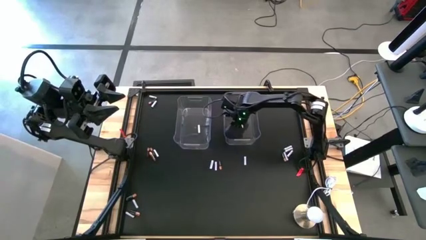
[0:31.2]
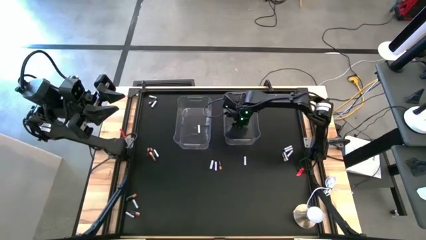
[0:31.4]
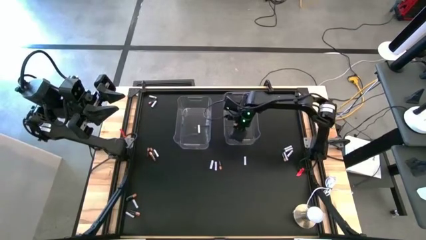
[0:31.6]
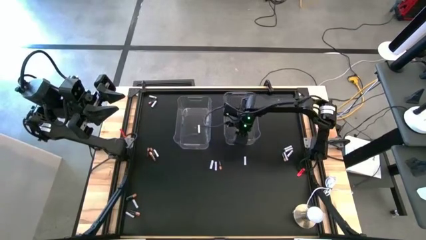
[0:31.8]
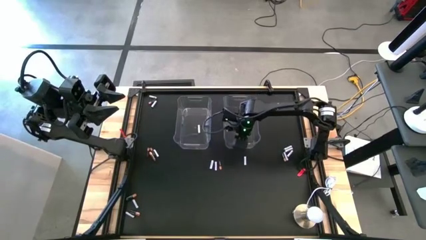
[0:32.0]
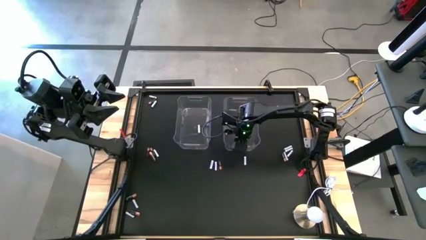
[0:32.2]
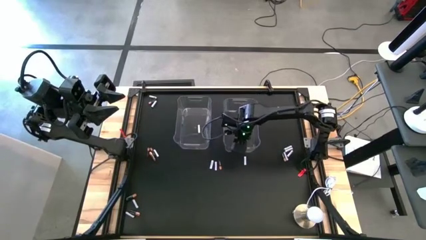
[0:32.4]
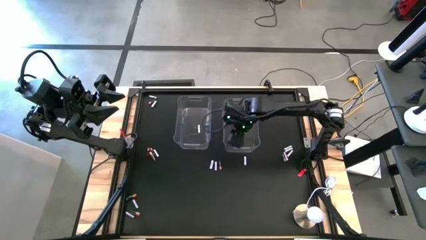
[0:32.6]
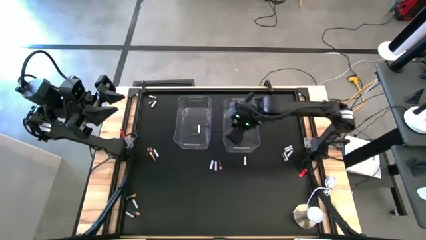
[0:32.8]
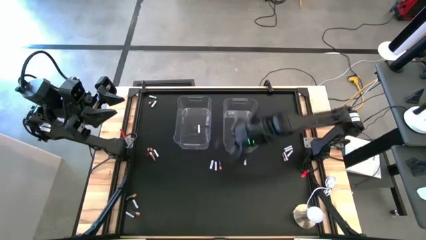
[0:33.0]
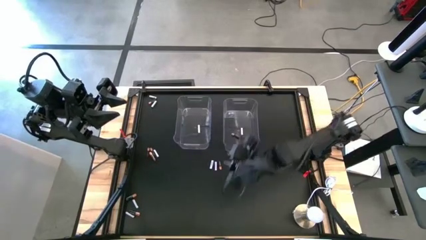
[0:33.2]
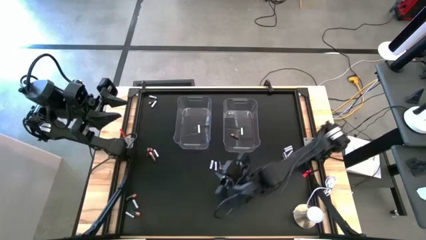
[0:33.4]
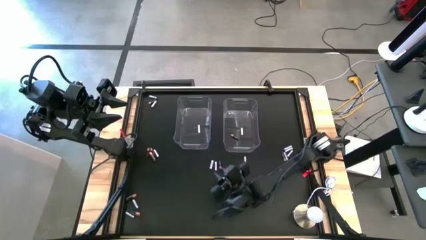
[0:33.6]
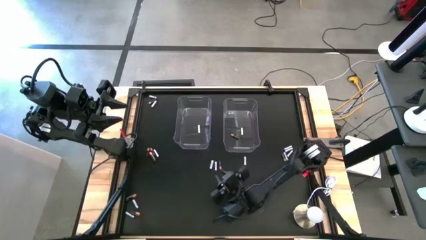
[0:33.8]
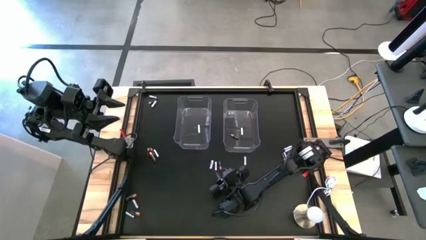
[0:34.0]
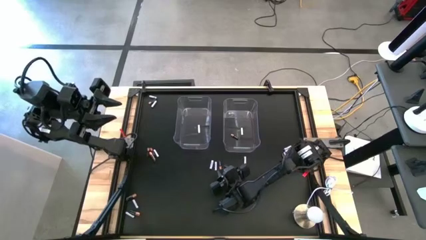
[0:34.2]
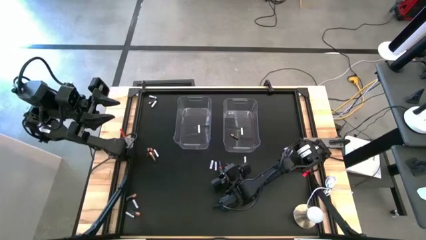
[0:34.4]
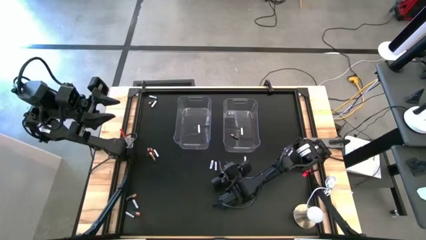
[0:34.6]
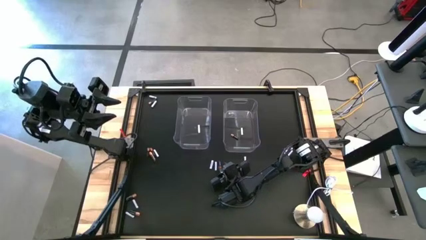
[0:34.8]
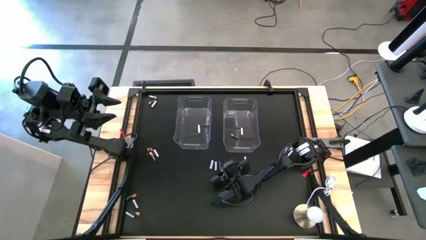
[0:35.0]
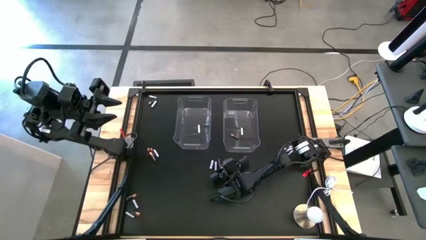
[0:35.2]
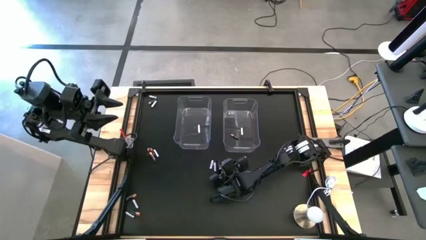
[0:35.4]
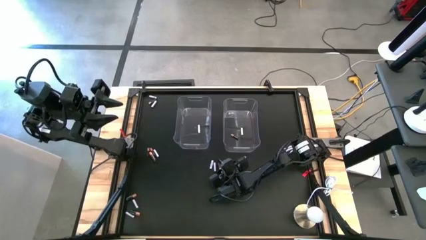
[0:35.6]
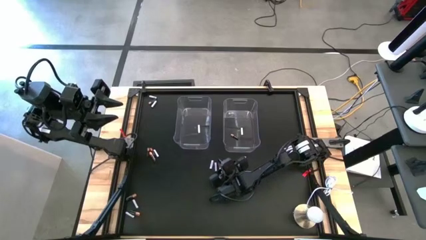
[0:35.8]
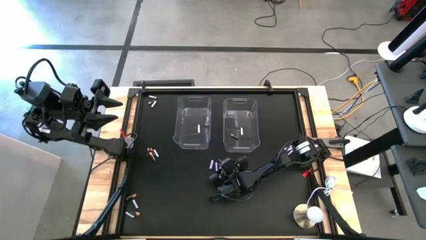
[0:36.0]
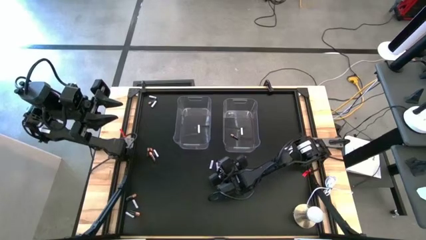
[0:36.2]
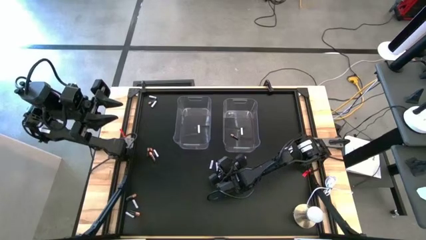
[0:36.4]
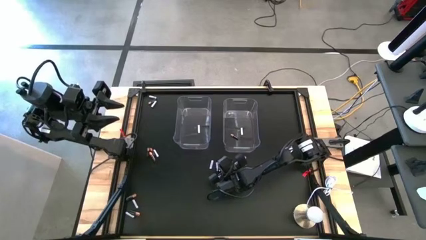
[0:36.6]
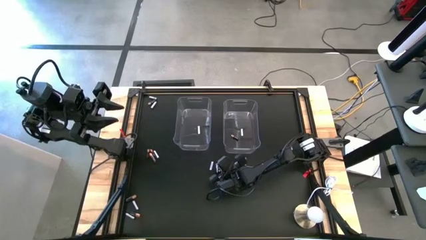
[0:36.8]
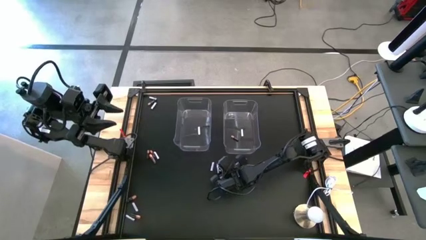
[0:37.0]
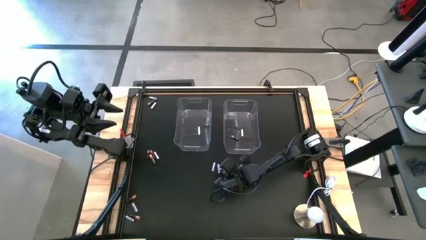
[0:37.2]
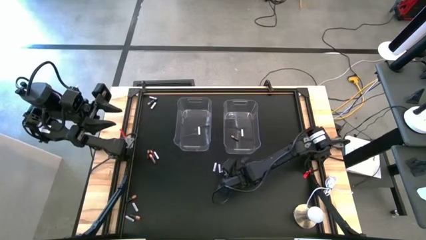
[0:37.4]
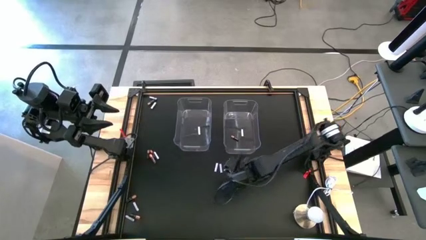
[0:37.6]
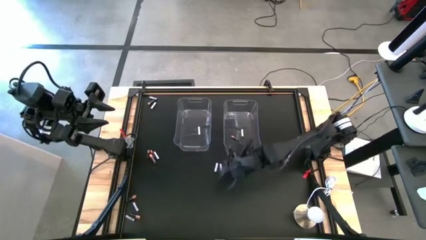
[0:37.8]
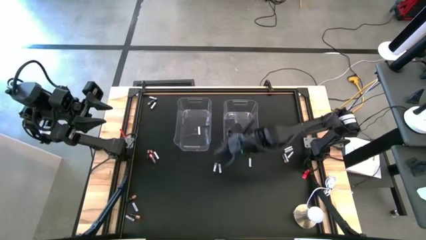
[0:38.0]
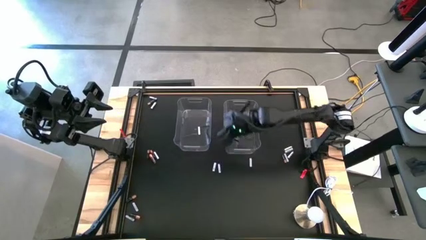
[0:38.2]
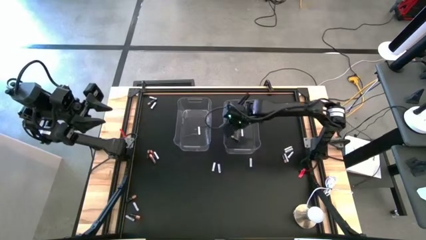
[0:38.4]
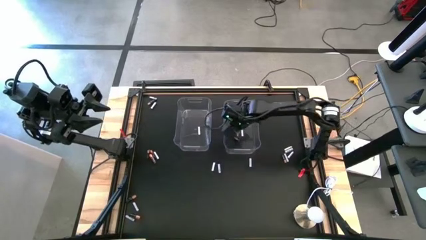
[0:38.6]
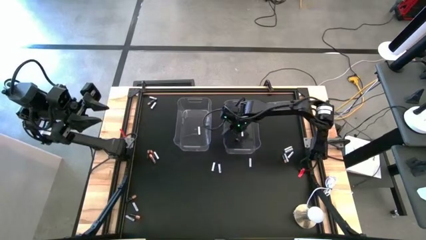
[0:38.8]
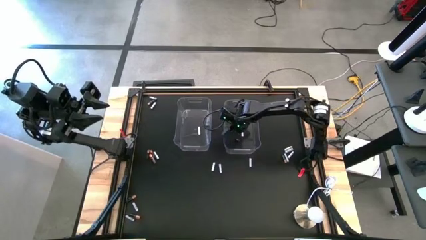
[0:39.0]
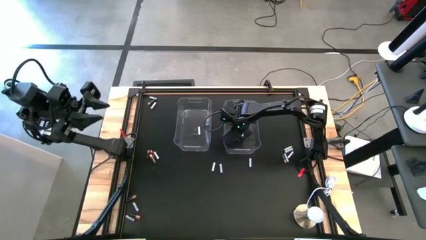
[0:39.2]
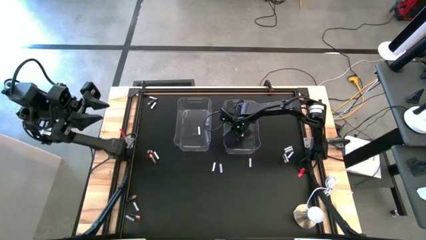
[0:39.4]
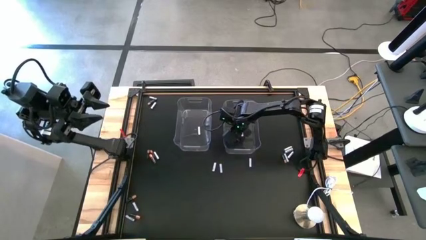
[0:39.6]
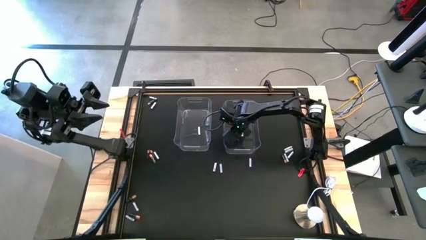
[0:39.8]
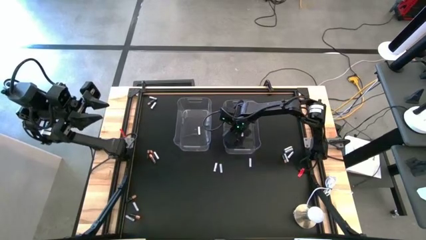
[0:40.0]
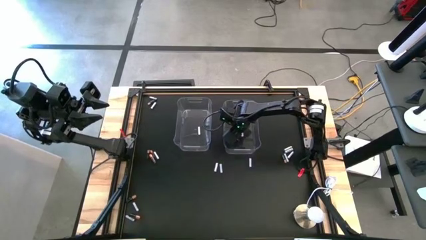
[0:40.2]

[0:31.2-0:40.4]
Task: Sort batteries
Put the black battery into the right transparent bin
